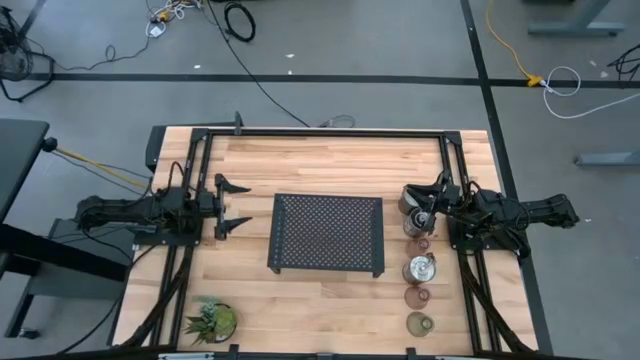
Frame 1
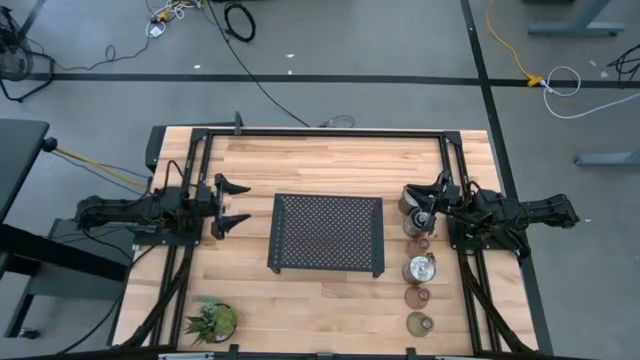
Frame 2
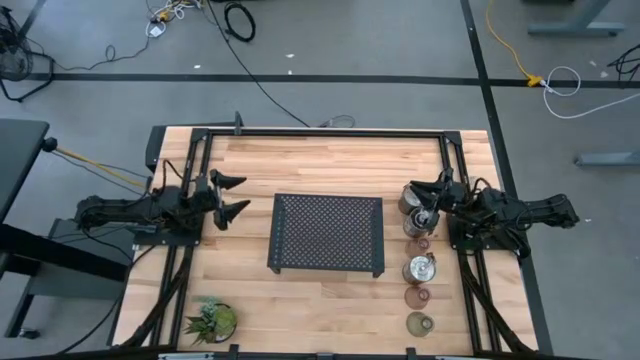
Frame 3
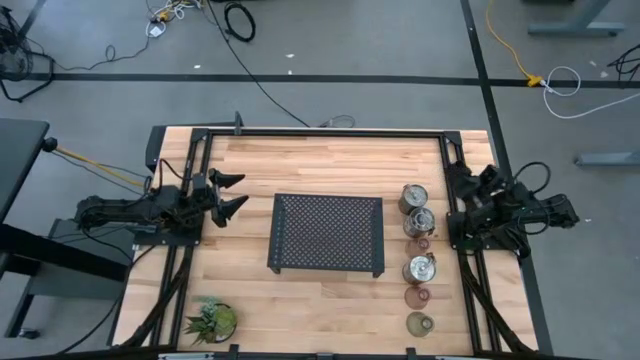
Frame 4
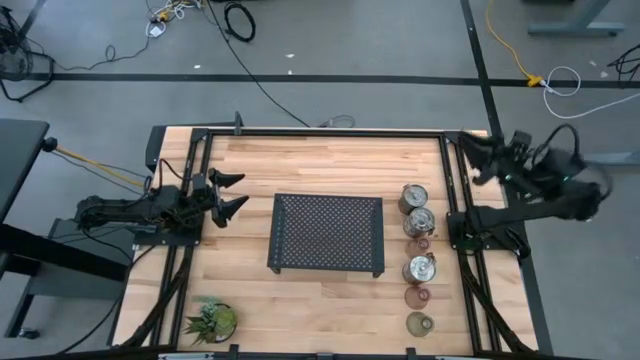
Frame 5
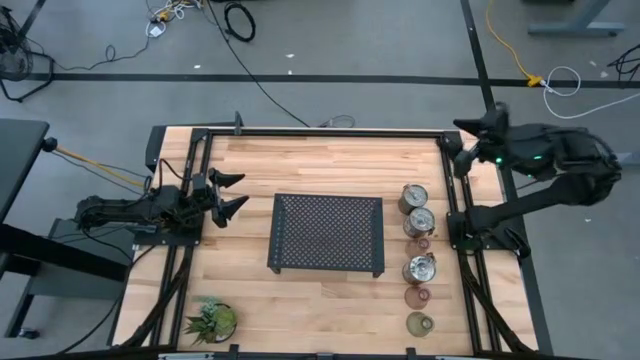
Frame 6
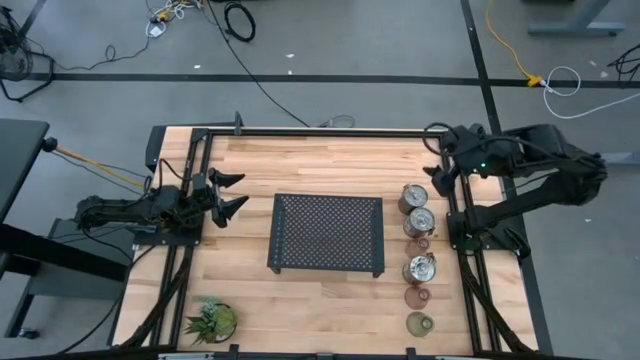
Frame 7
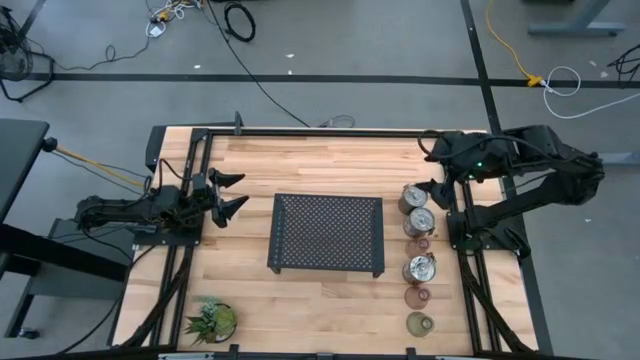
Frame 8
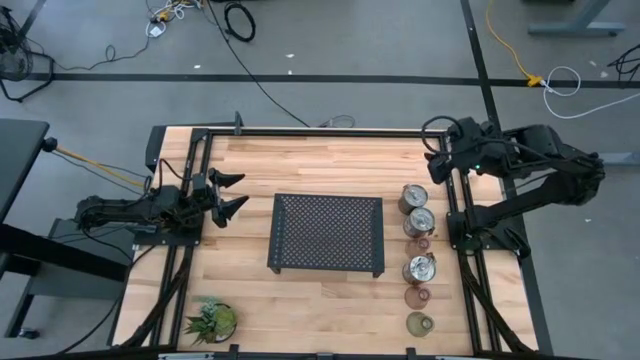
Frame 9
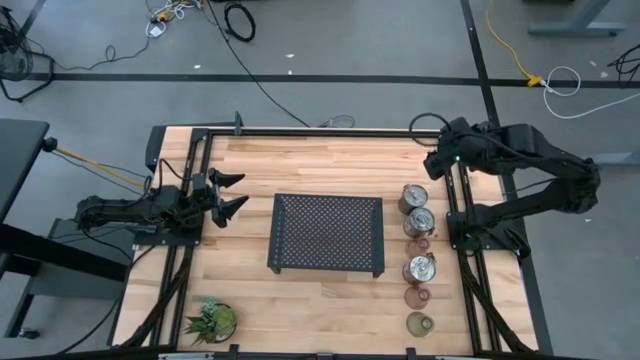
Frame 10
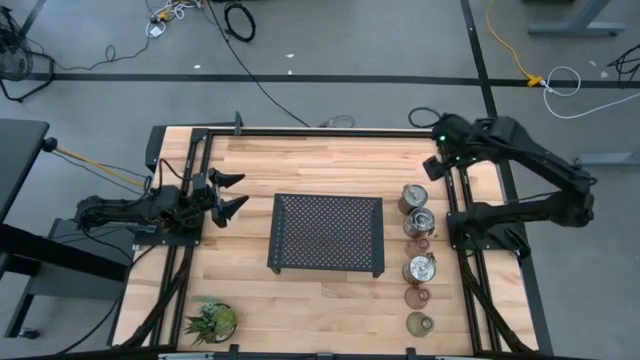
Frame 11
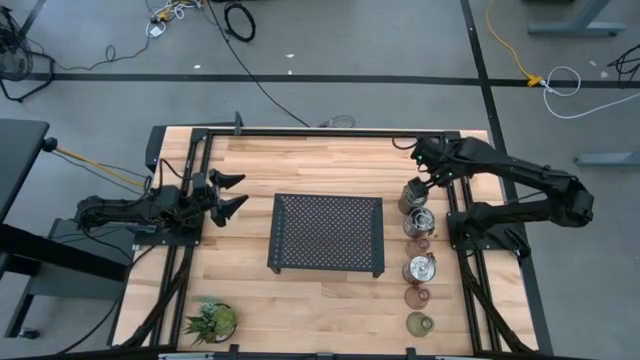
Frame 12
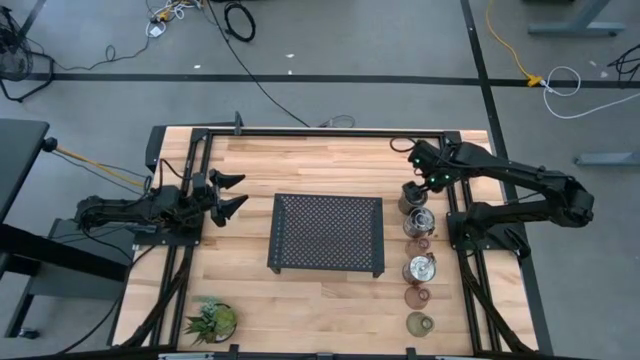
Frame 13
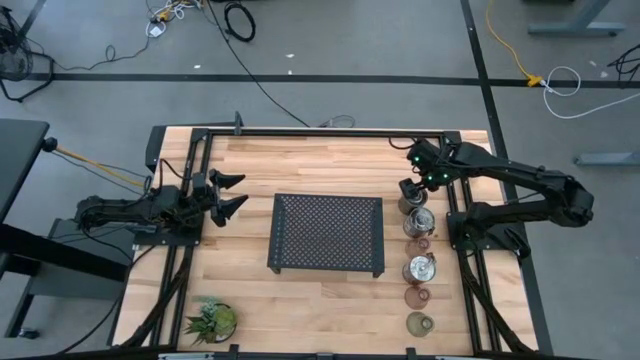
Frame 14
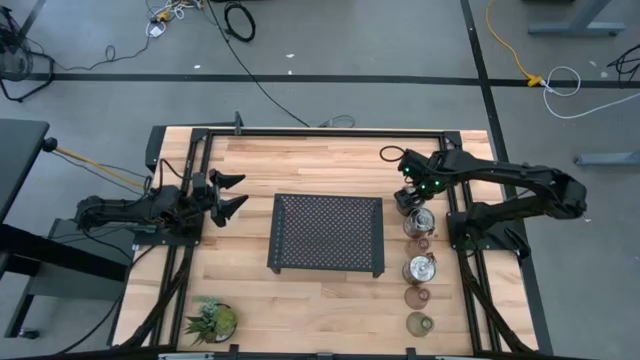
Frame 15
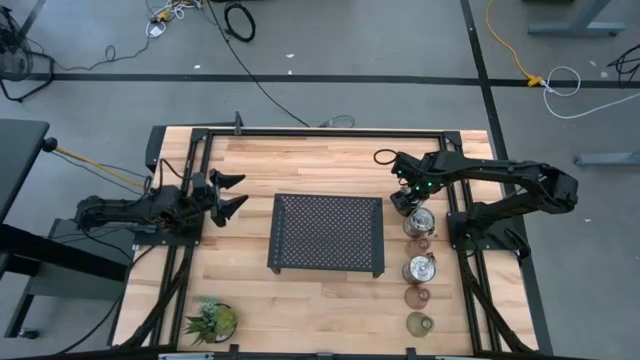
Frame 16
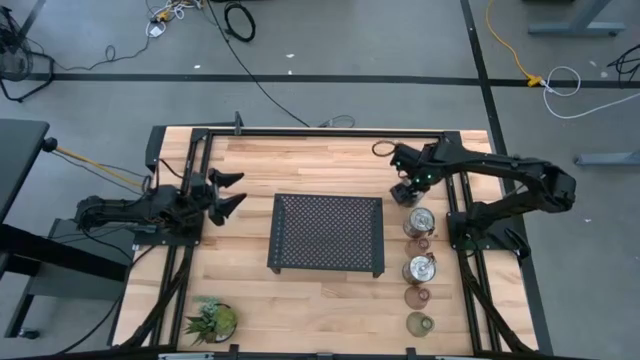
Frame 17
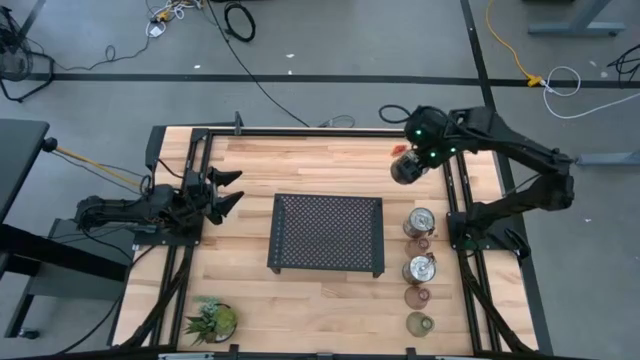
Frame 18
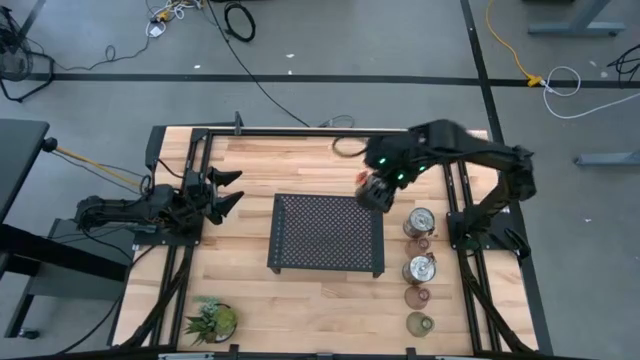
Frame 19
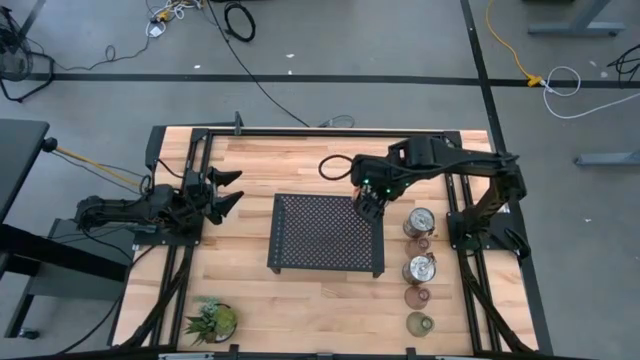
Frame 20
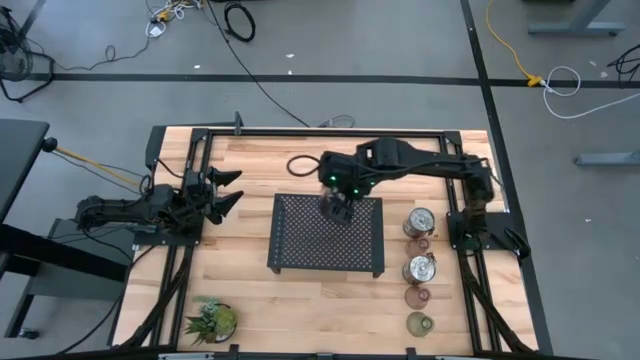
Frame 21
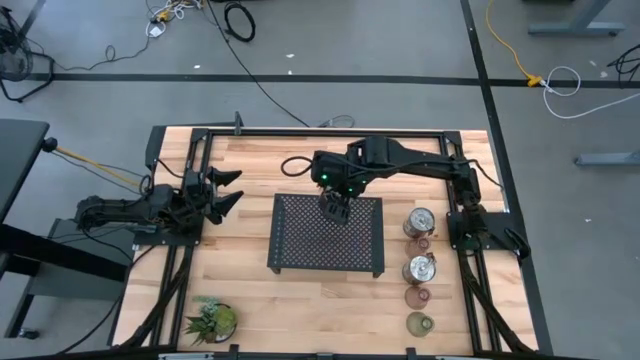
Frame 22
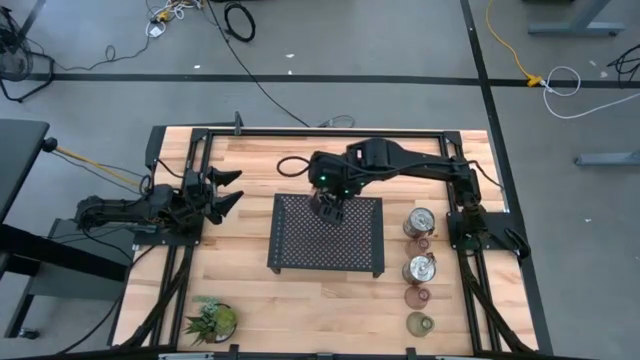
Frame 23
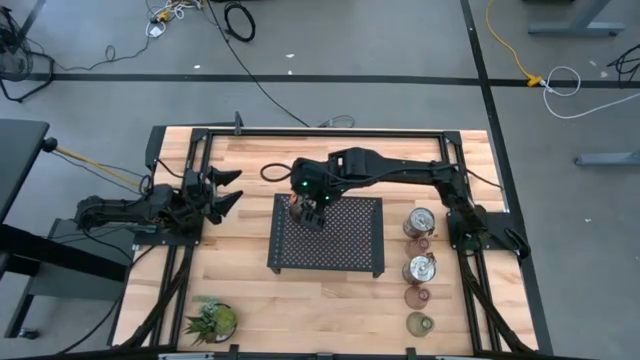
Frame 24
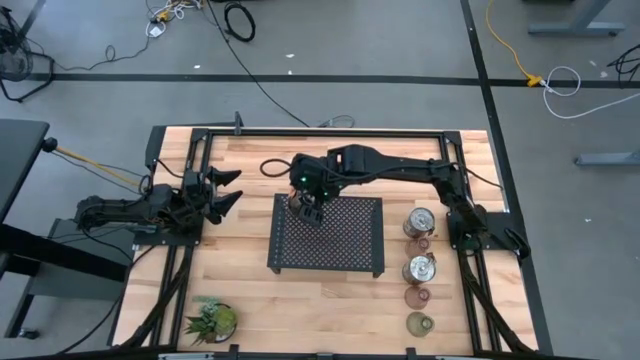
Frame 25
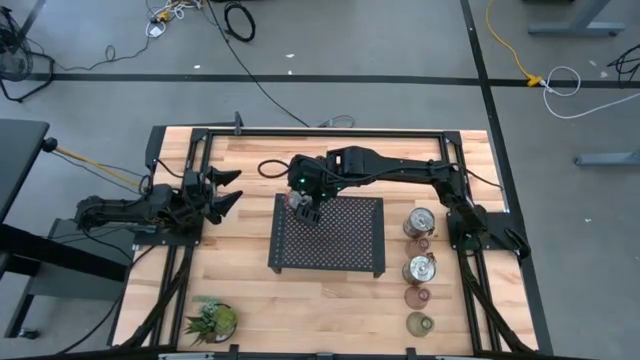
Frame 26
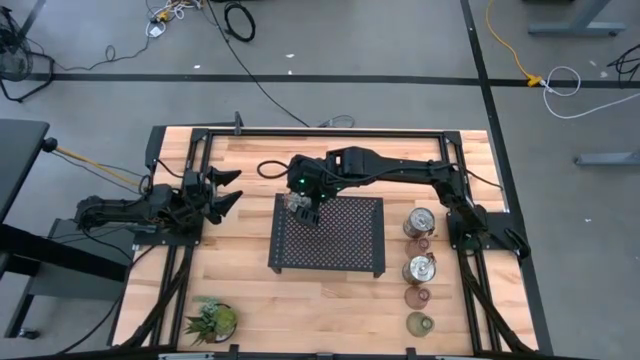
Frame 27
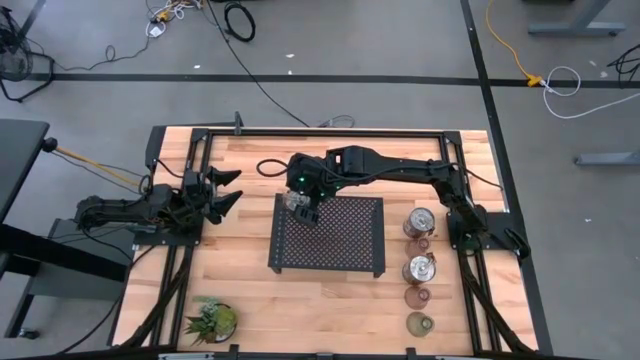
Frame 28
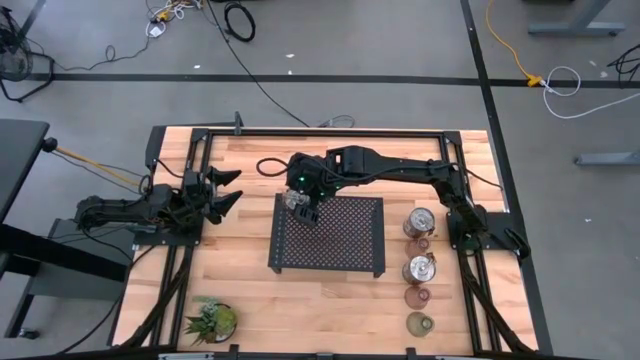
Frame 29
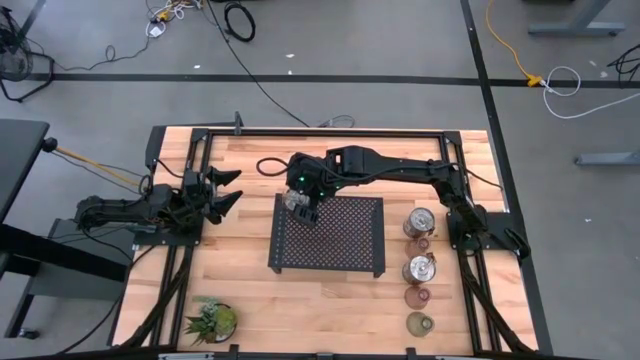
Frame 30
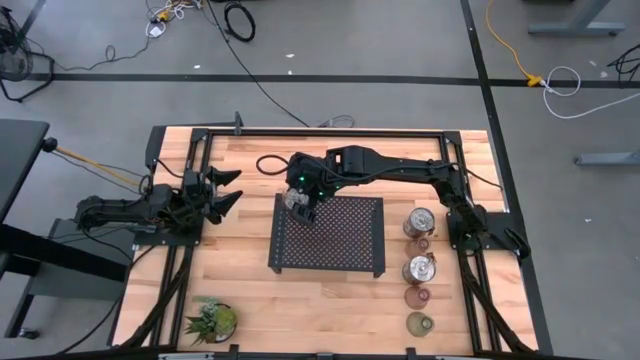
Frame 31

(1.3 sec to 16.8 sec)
Task: Pick & Place candle stick holders
Put the orange scented candle on the shelf

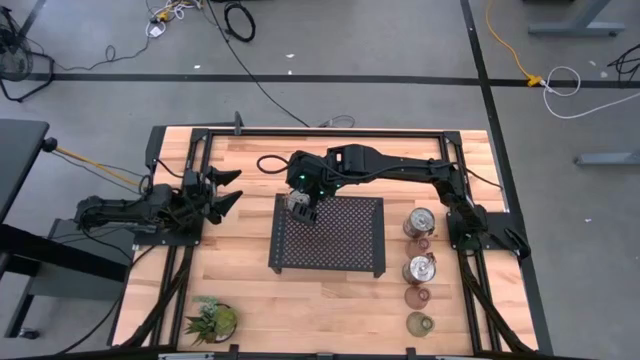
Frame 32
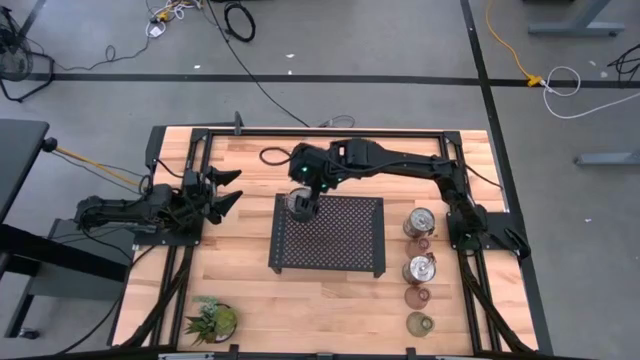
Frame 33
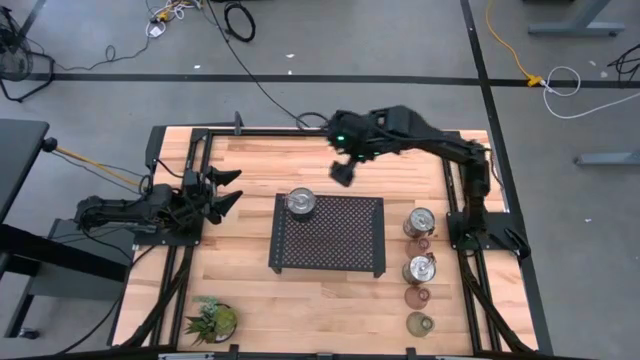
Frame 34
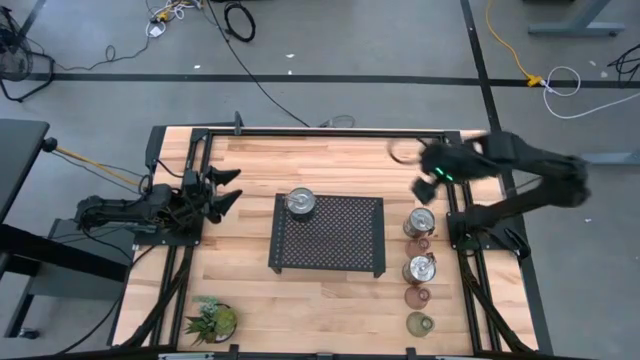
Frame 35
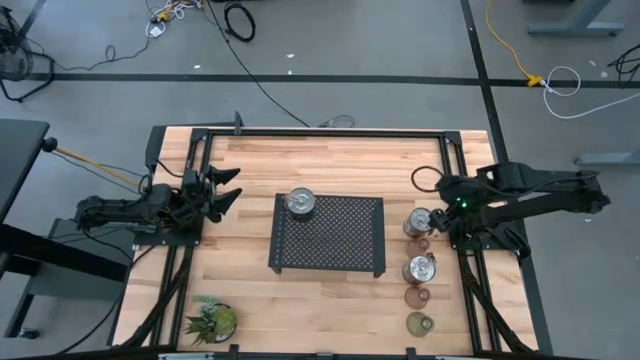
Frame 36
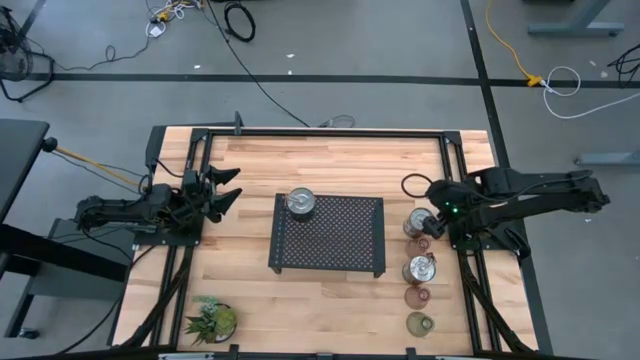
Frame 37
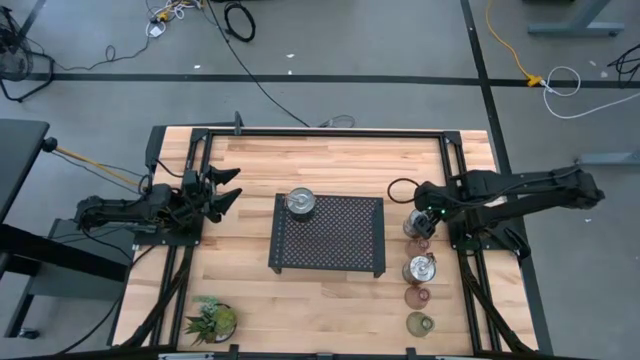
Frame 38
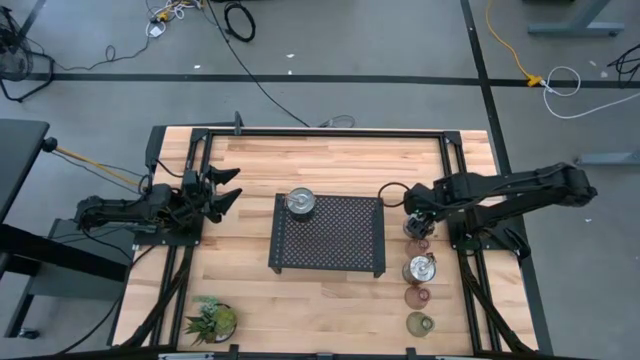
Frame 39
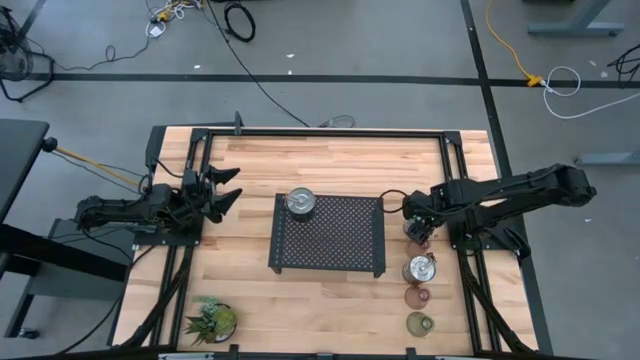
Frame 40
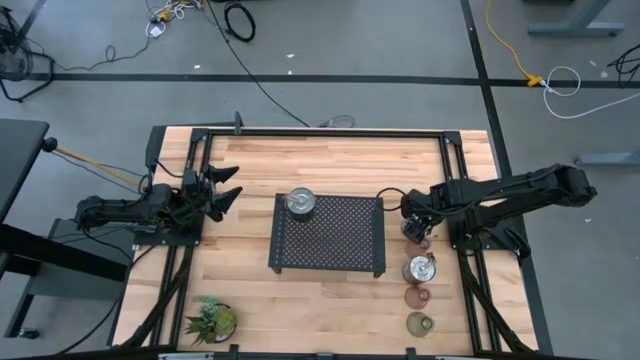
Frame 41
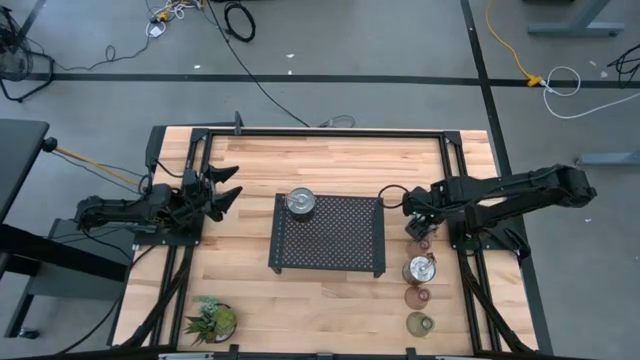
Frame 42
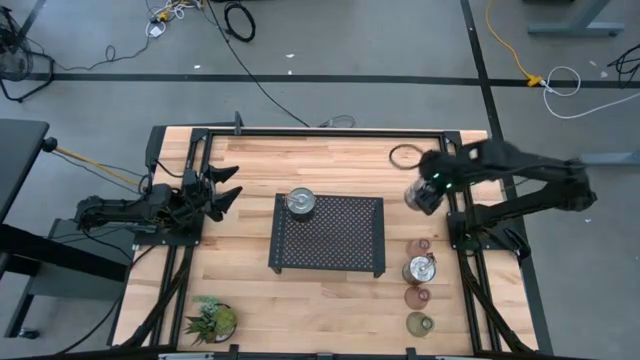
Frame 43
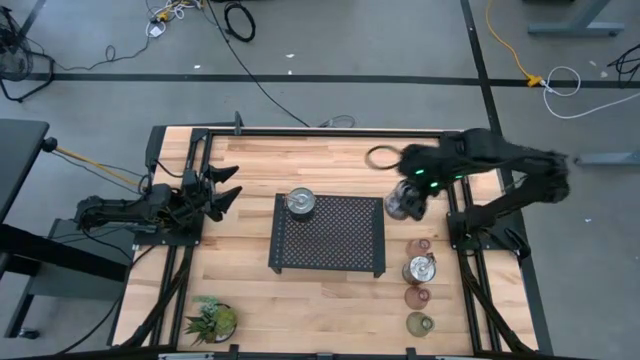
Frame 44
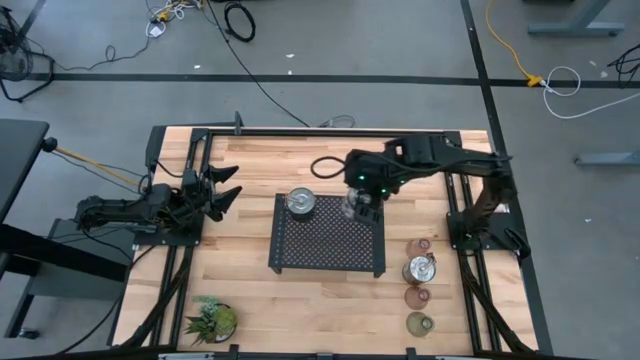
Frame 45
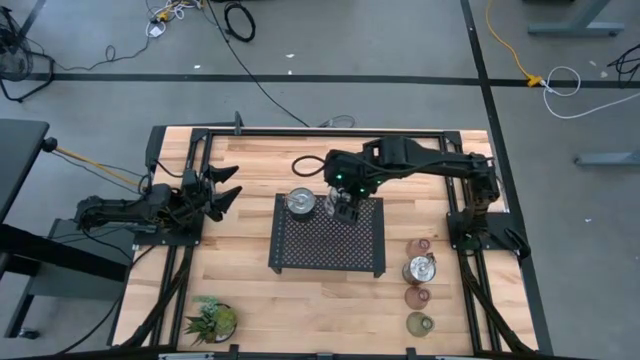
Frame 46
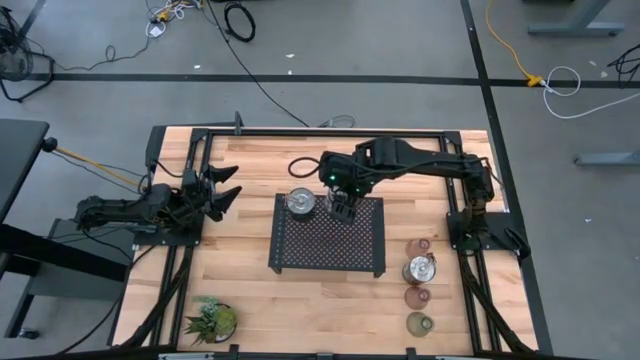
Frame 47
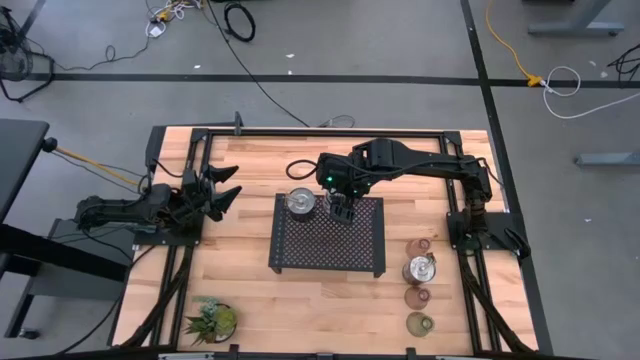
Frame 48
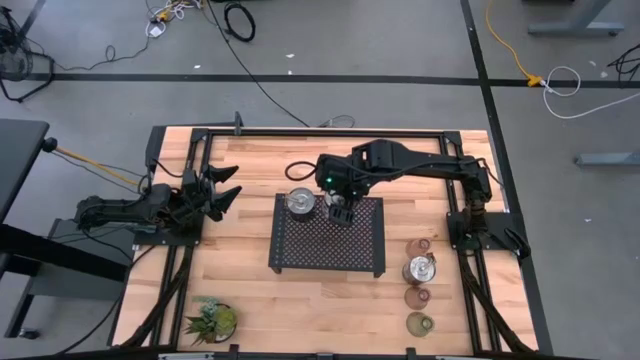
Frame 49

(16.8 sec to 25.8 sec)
Put the top brown scented candle on the shelf aligned with the other scented candle
